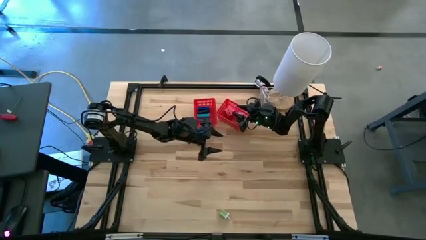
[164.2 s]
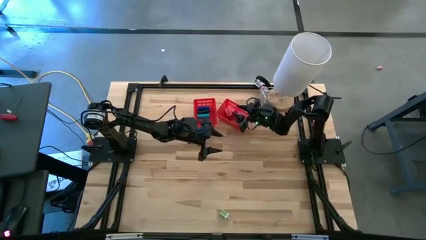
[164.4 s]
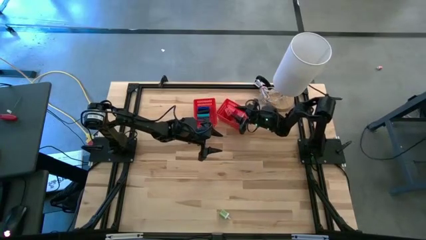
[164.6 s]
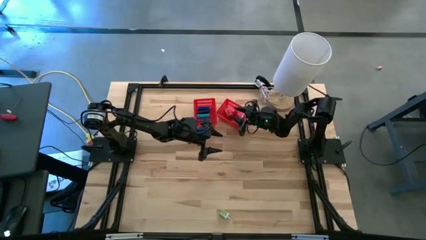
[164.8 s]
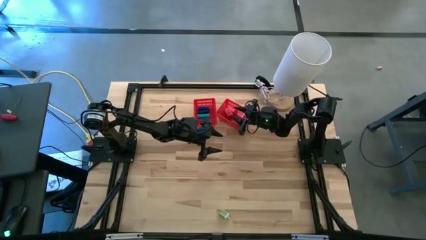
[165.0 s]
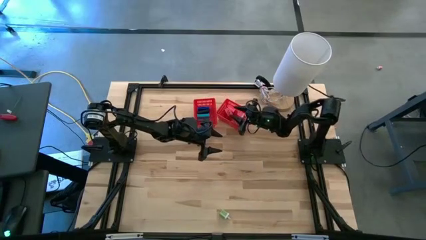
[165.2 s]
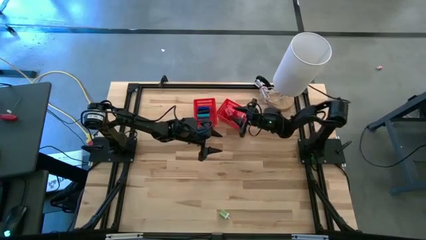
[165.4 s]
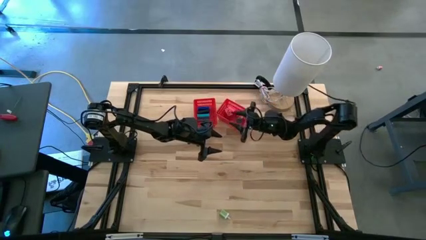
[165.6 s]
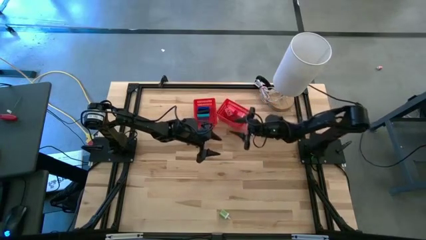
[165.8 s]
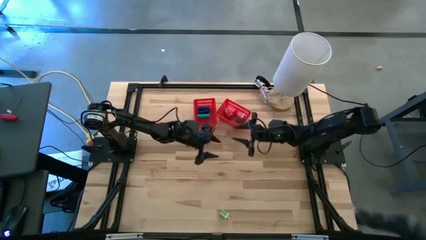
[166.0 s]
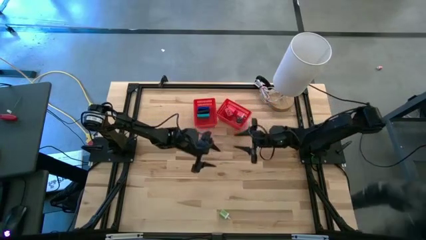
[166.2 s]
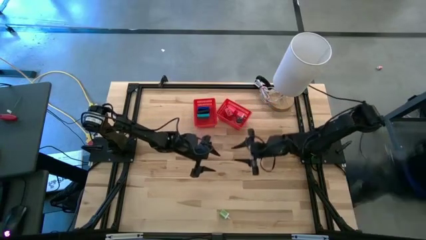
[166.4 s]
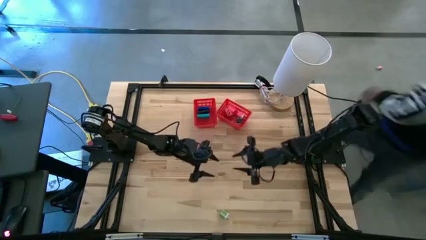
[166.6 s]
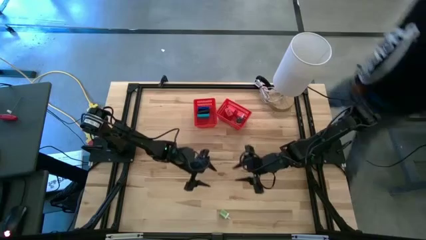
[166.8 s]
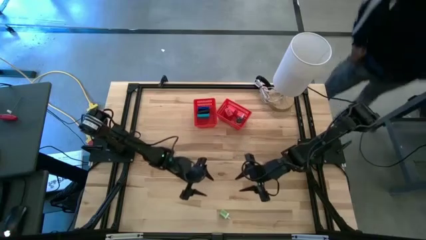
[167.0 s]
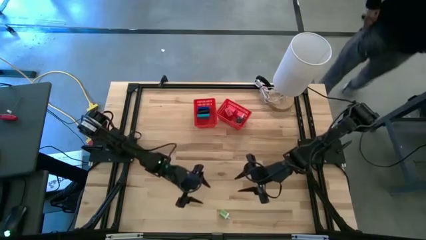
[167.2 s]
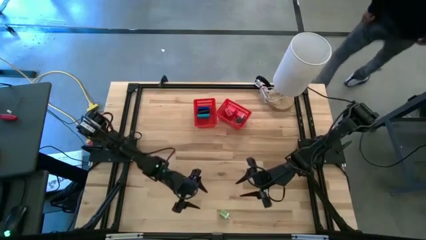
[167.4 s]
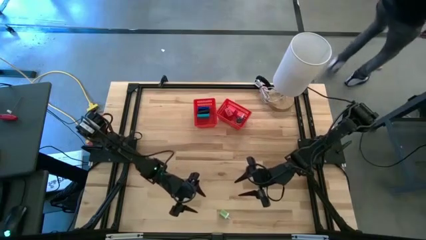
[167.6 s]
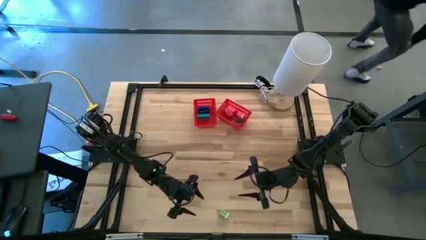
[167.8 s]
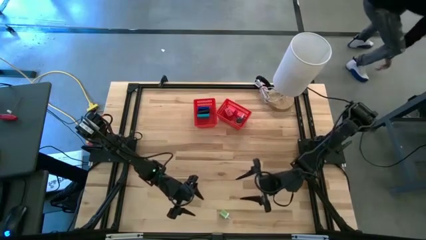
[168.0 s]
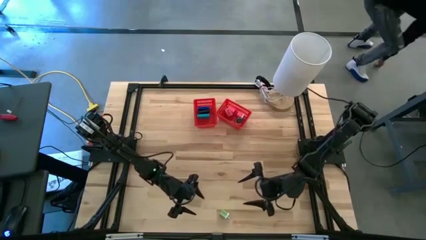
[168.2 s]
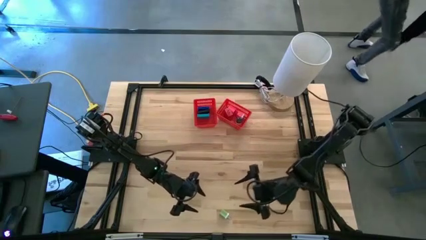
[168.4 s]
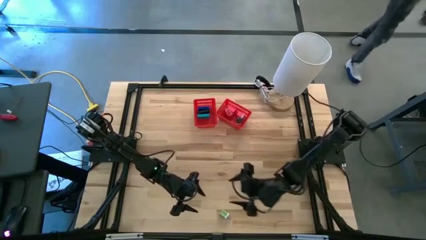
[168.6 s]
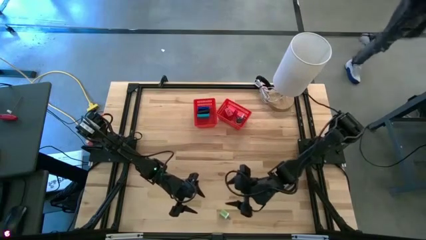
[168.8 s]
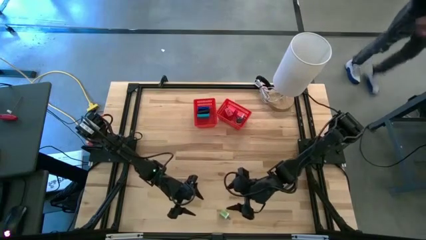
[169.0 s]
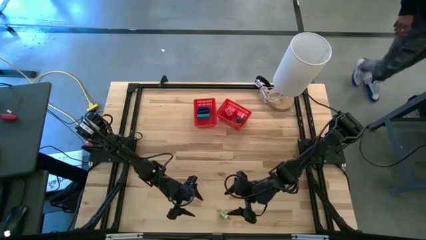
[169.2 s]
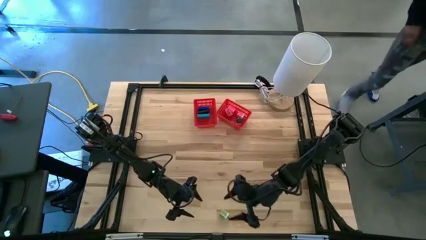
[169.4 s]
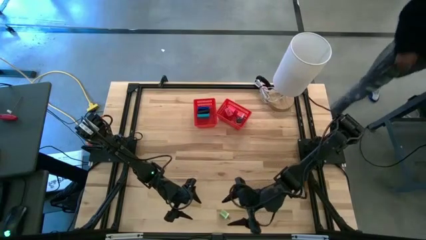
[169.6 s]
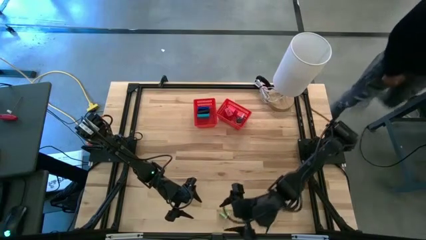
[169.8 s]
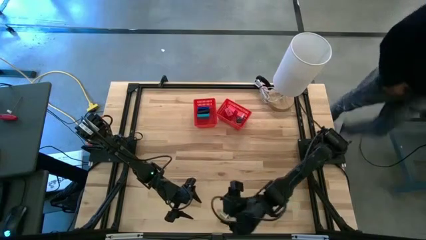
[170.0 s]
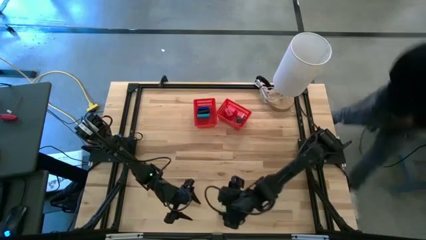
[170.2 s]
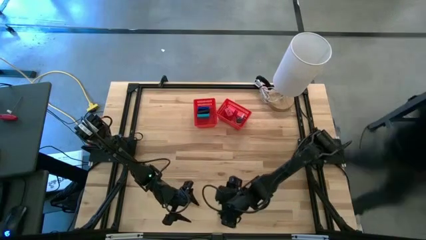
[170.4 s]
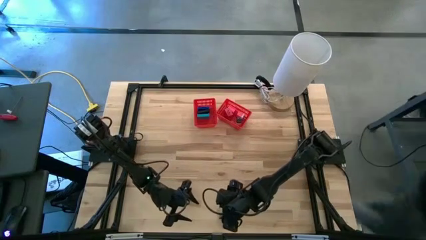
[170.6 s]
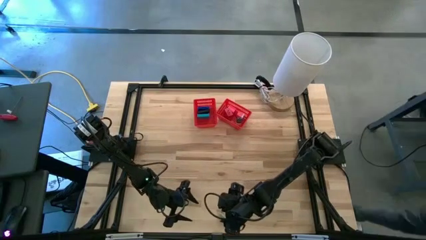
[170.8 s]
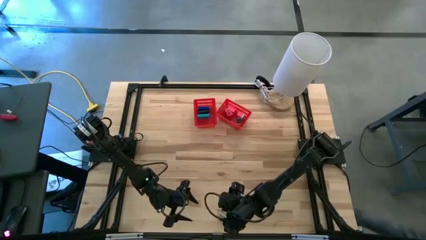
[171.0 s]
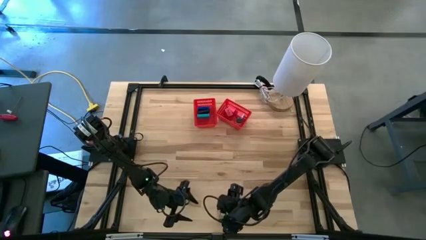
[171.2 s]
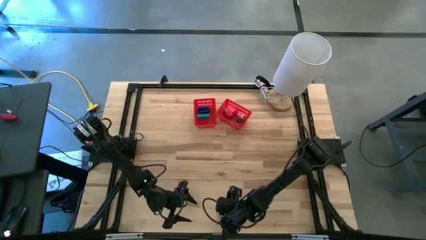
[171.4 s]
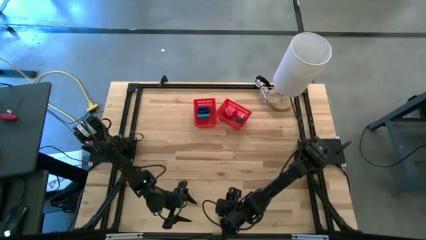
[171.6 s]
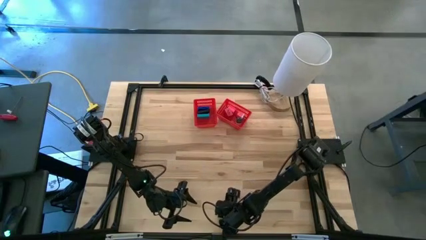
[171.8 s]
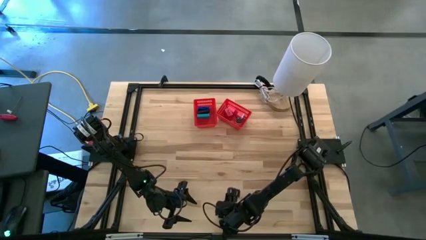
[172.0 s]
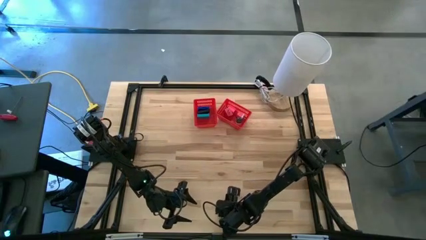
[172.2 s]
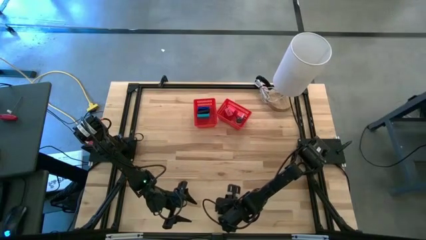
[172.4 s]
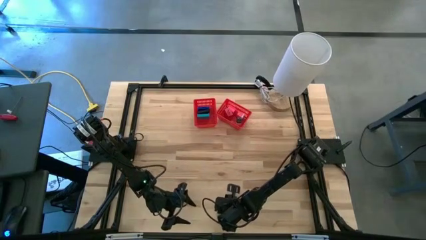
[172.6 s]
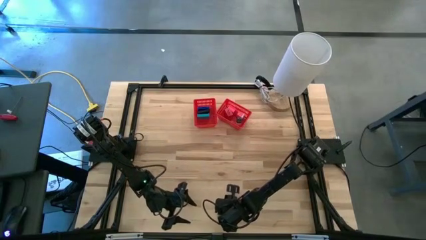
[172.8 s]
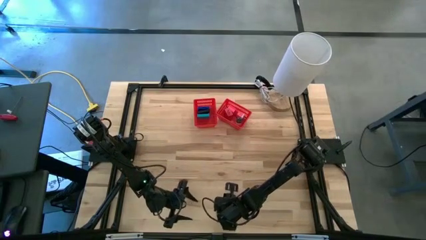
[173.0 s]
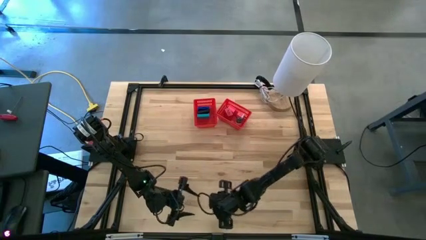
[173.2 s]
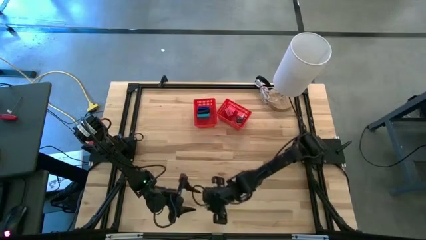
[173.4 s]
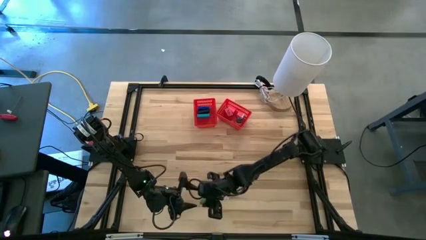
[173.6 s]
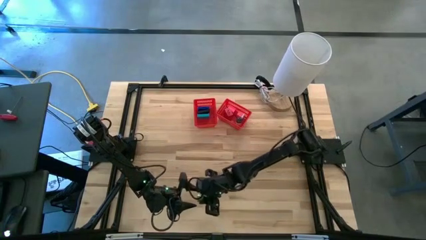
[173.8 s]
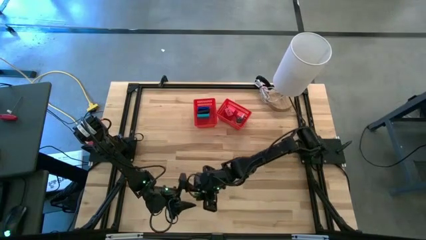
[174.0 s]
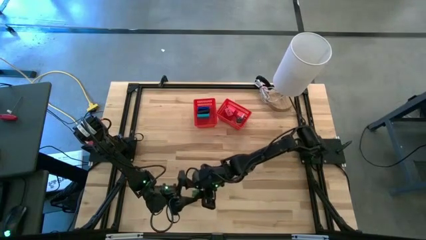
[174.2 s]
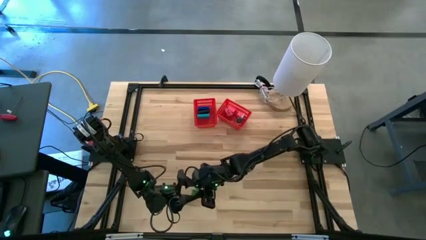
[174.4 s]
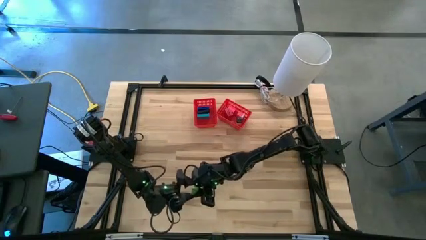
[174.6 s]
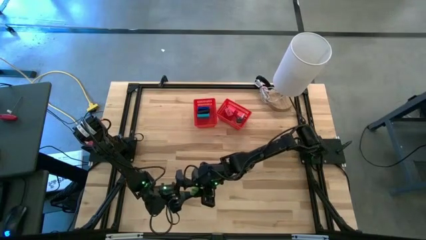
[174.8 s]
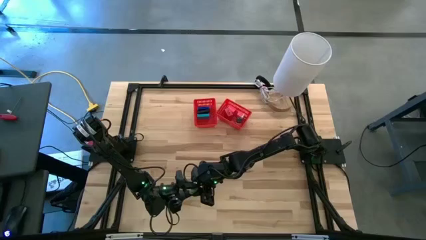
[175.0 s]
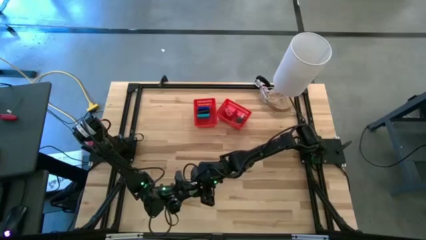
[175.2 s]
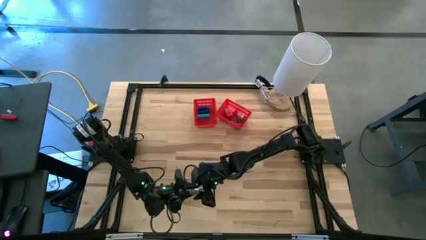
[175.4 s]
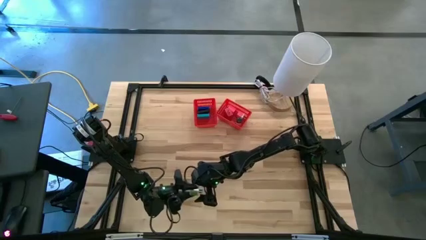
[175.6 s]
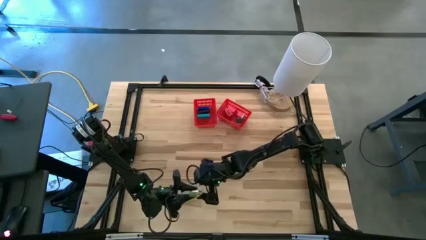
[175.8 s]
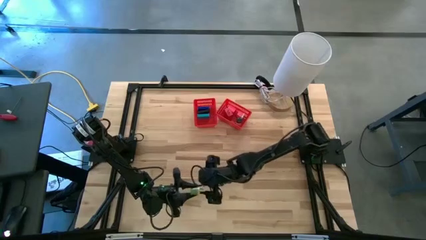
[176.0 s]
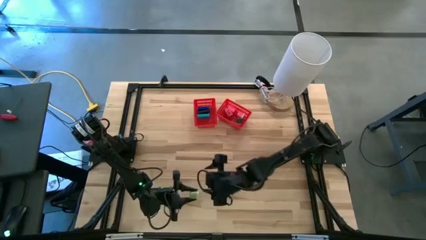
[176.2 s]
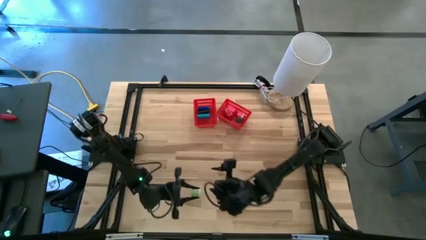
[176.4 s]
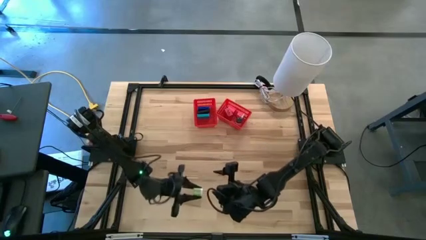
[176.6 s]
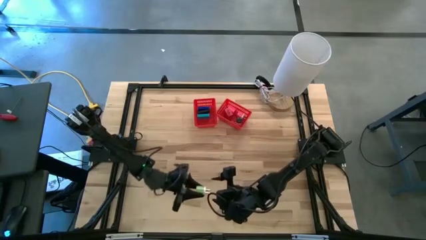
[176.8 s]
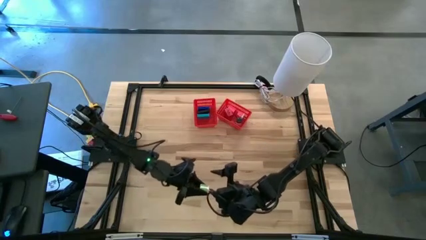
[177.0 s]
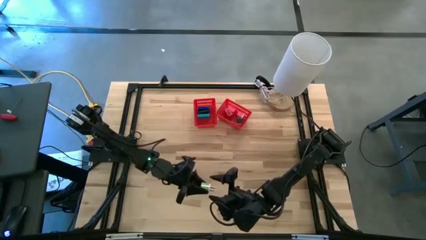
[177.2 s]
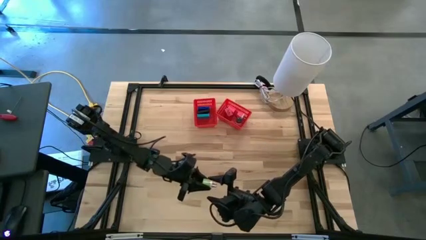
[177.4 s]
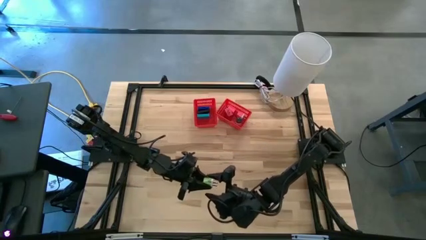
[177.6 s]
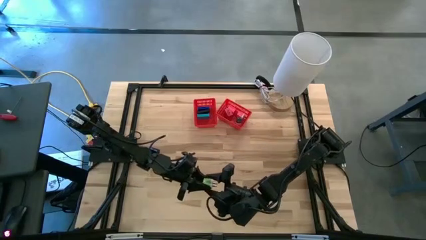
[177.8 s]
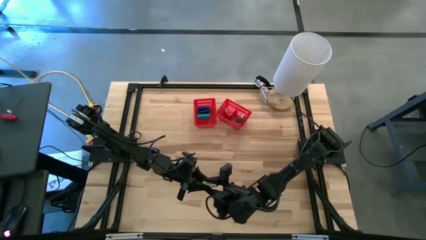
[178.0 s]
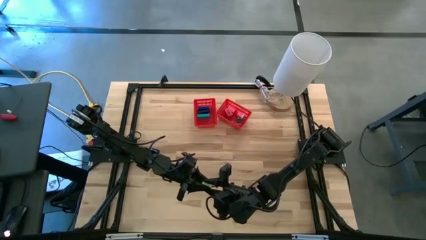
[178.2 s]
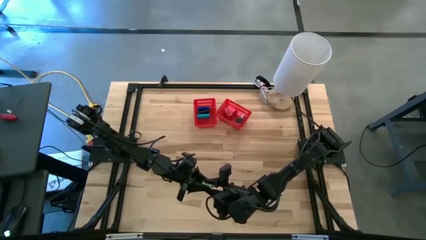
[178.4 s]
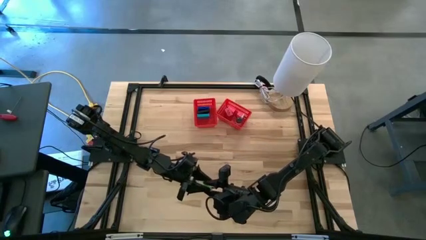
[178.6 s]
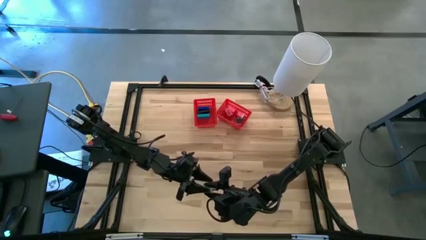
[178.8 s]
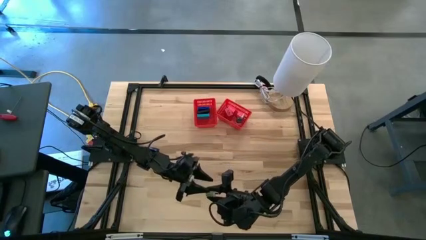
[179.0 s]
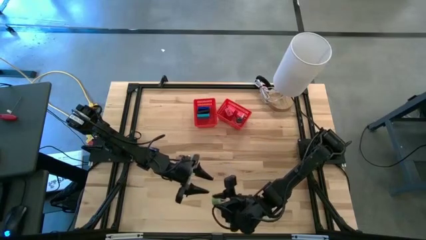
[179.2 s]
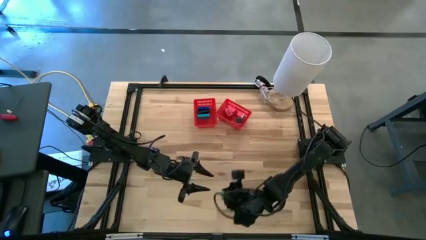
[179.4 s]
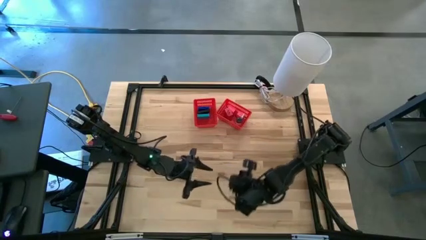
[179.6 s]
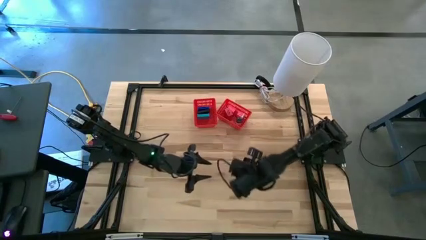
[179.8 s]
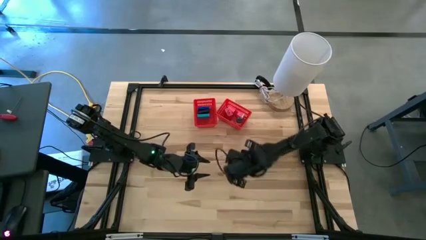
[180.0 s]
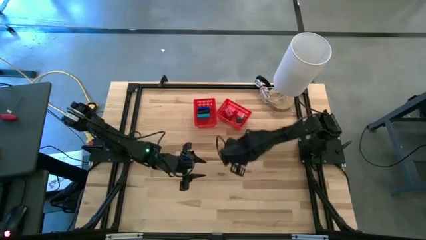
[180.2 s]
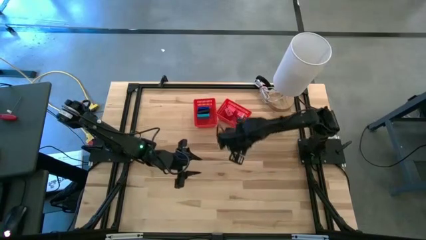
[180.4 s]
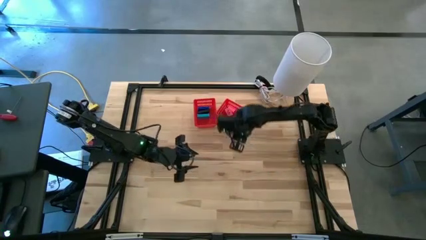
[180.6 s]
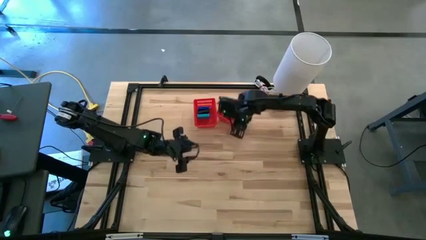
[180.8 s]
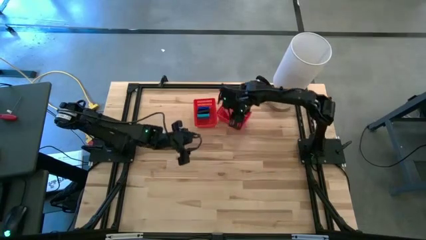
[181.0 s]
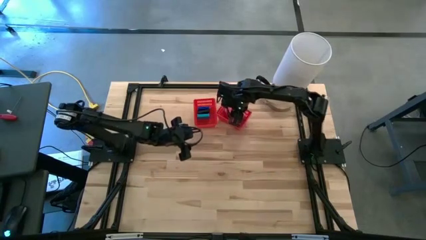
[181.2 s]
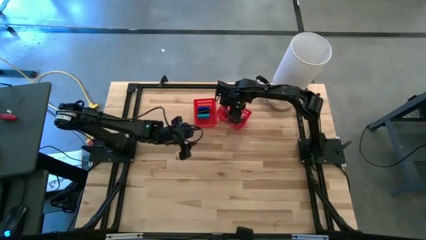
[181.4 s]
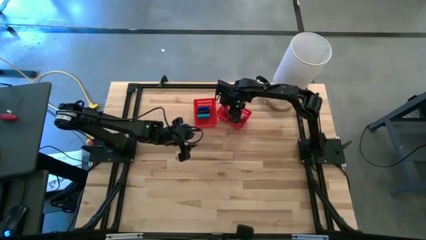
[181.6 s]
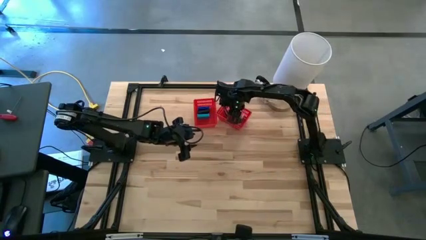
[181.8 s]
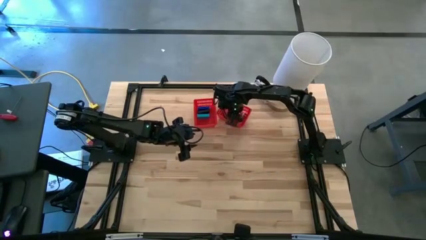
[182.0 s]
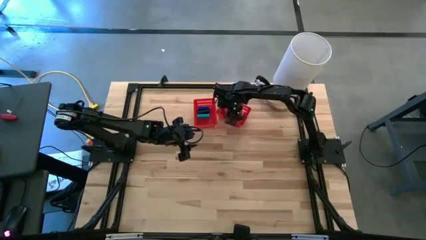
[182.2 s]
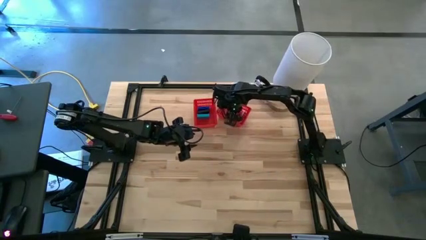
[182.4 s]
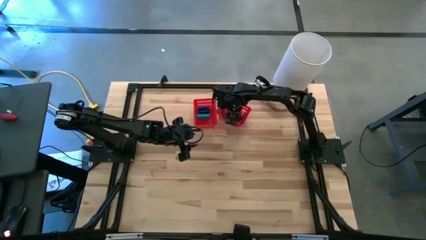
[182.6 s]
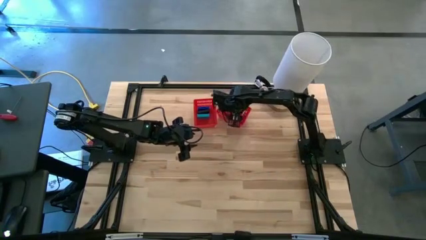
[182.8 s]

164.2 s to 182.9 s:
Task: Pick & Place Office items
Put the green charger adapter into the right red bin
